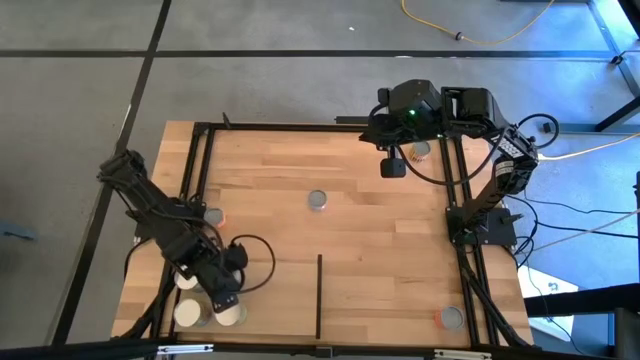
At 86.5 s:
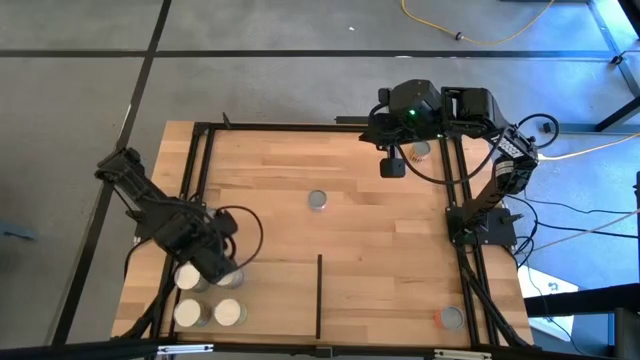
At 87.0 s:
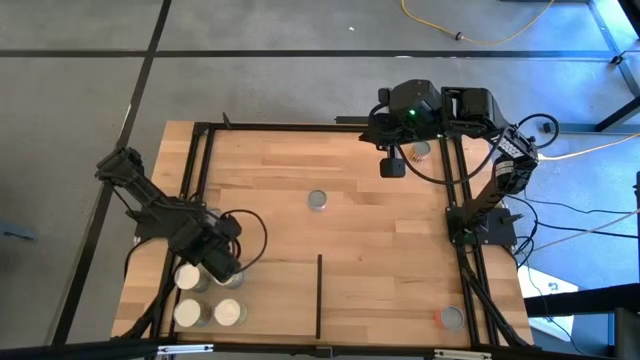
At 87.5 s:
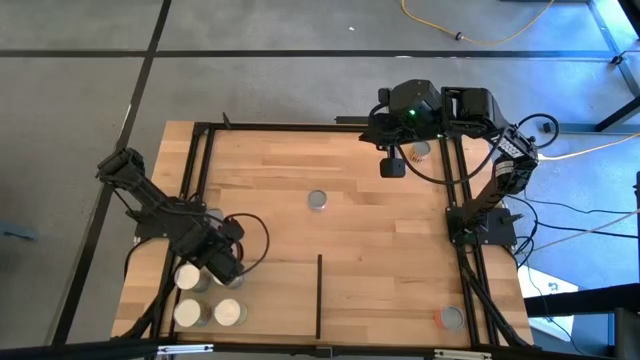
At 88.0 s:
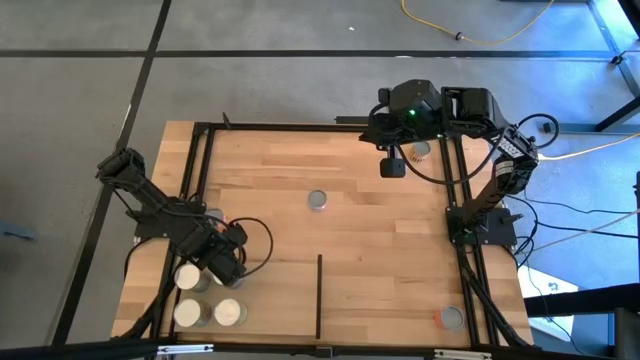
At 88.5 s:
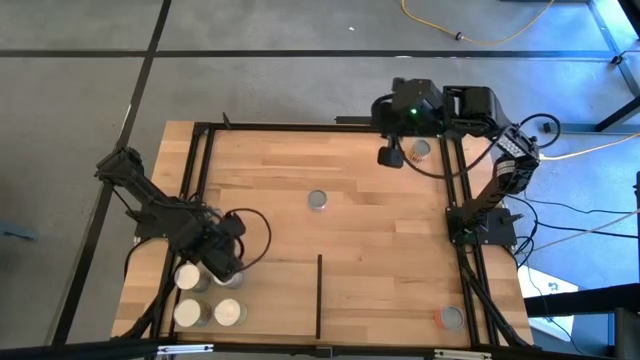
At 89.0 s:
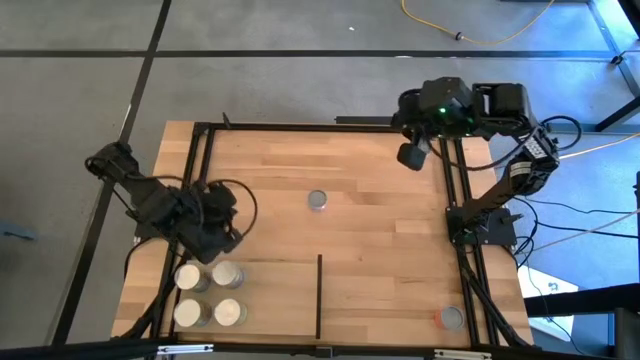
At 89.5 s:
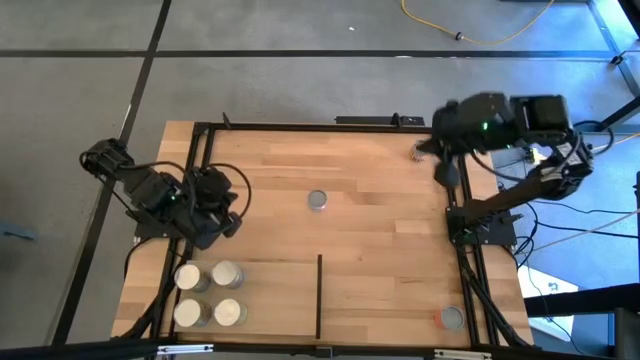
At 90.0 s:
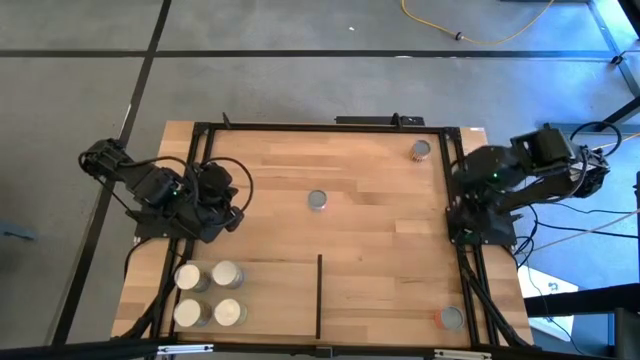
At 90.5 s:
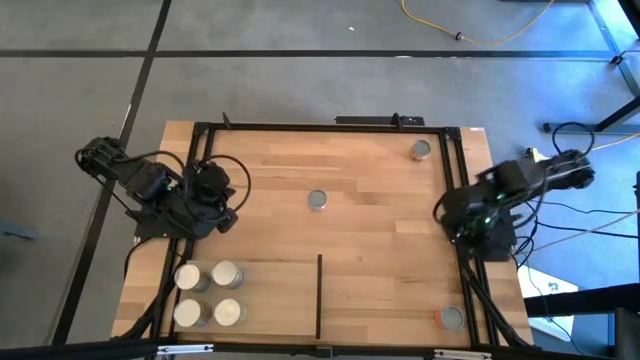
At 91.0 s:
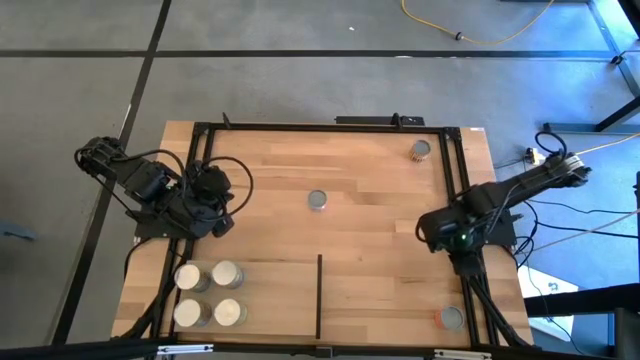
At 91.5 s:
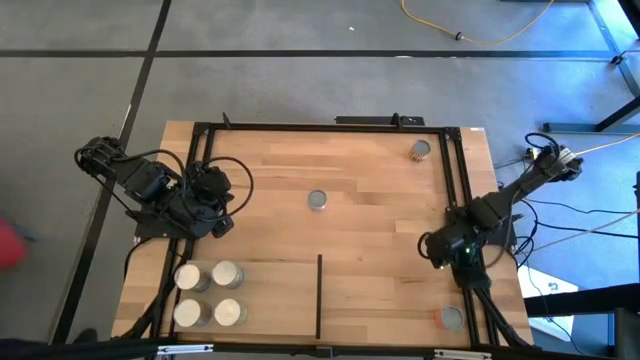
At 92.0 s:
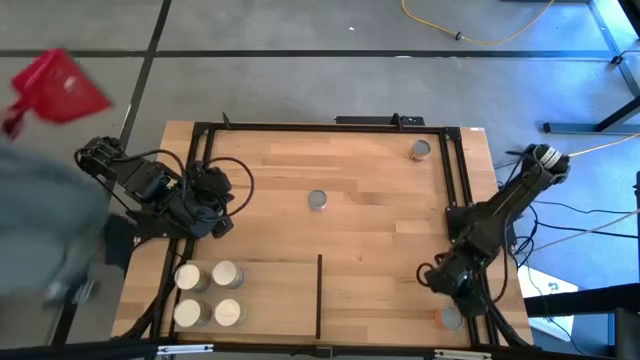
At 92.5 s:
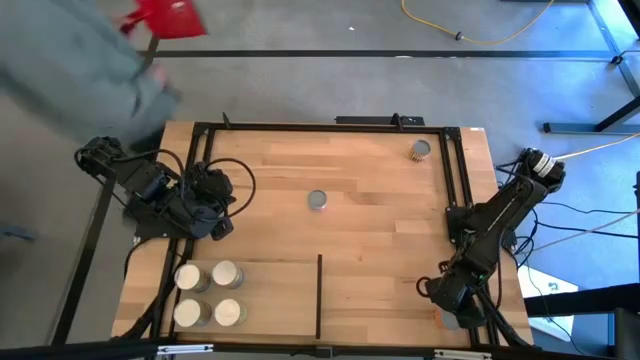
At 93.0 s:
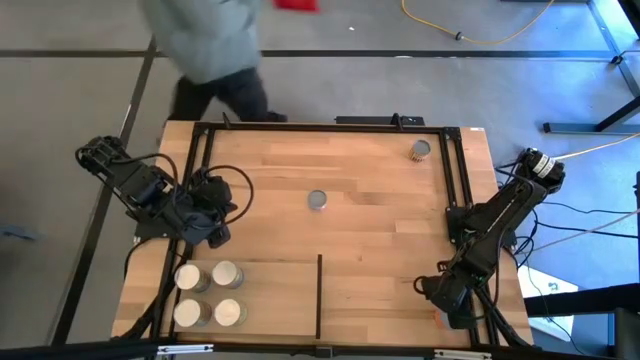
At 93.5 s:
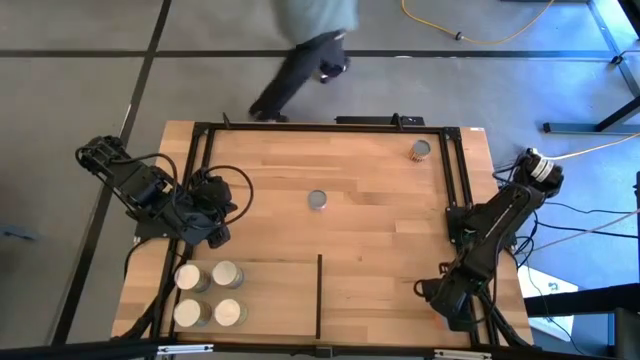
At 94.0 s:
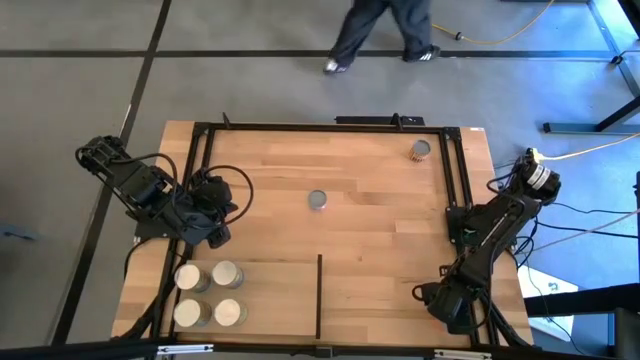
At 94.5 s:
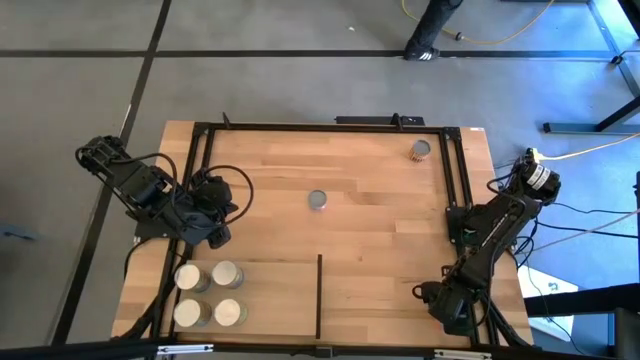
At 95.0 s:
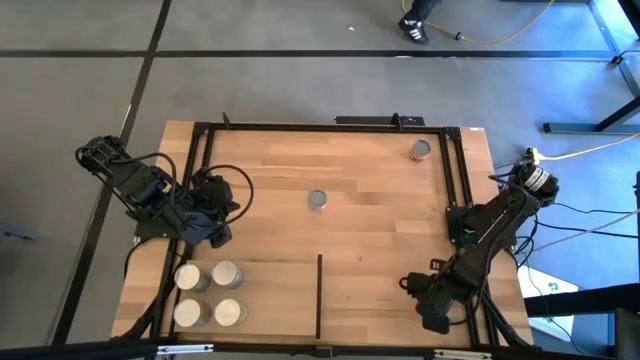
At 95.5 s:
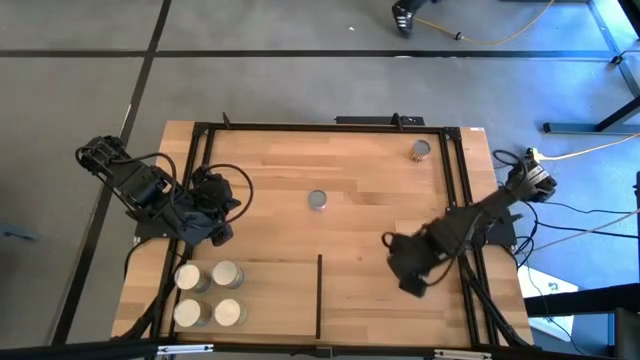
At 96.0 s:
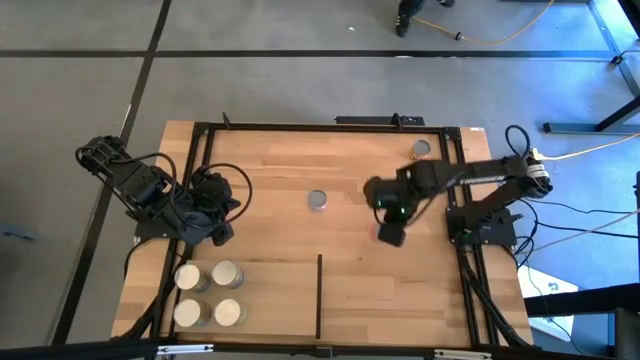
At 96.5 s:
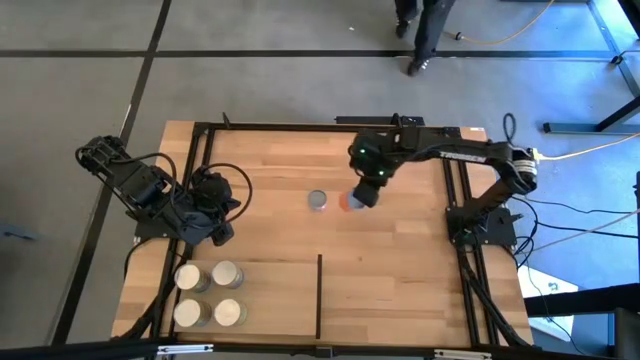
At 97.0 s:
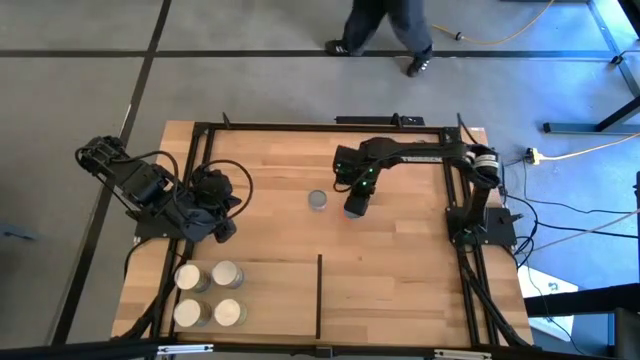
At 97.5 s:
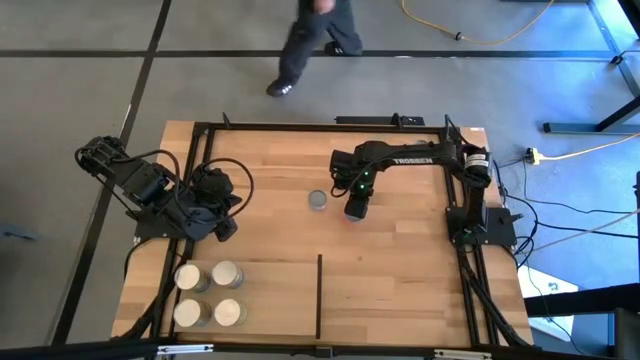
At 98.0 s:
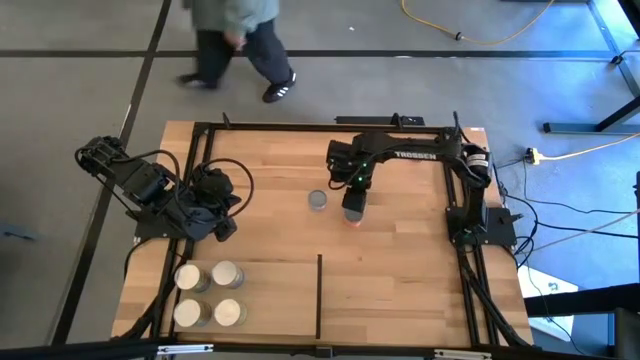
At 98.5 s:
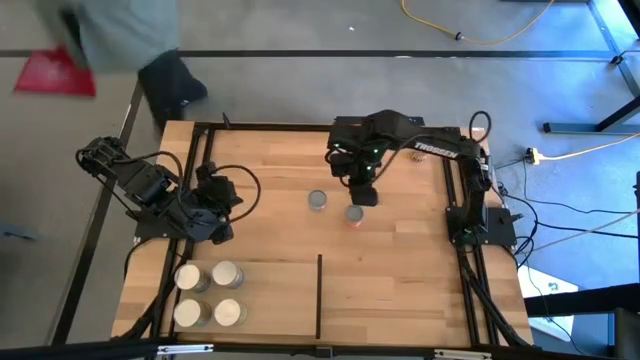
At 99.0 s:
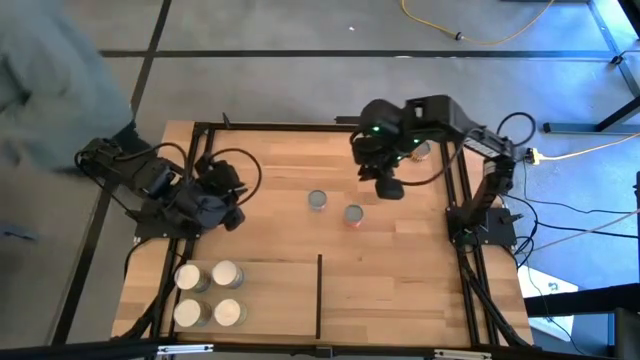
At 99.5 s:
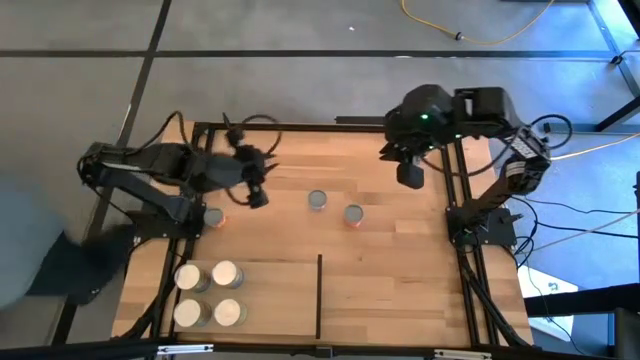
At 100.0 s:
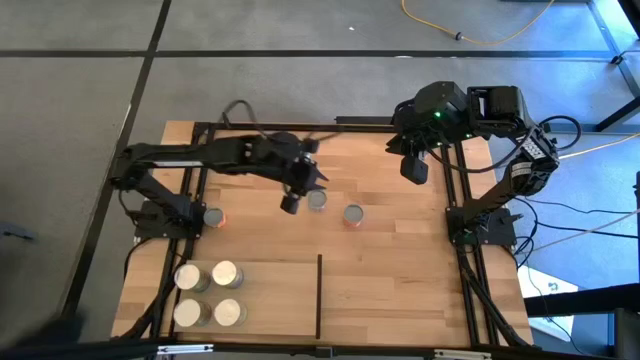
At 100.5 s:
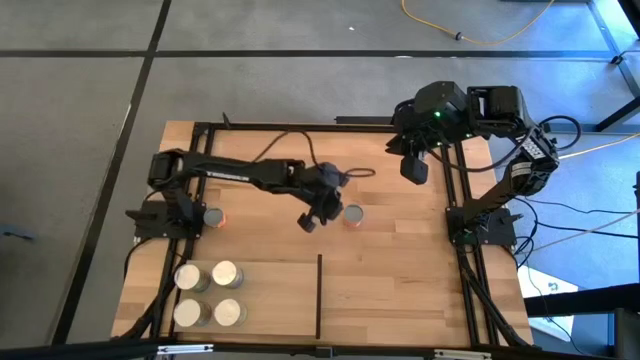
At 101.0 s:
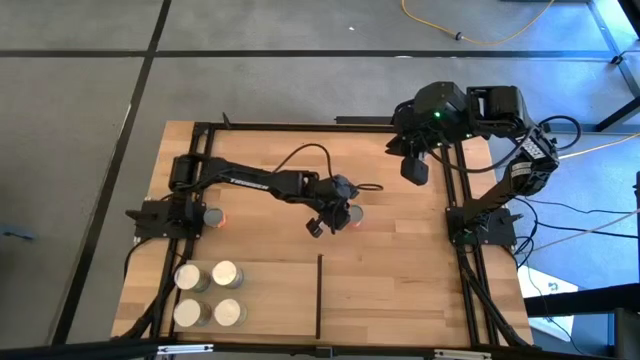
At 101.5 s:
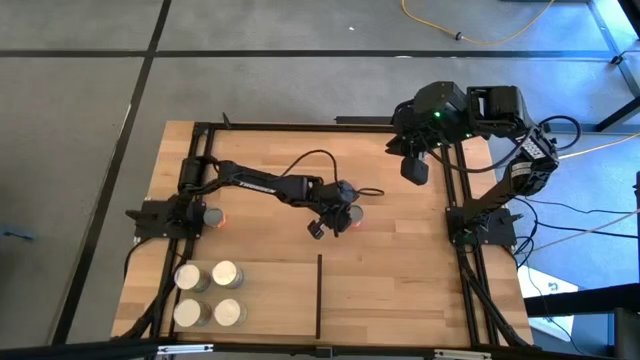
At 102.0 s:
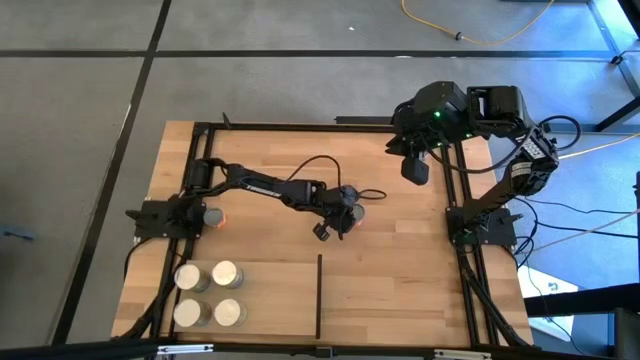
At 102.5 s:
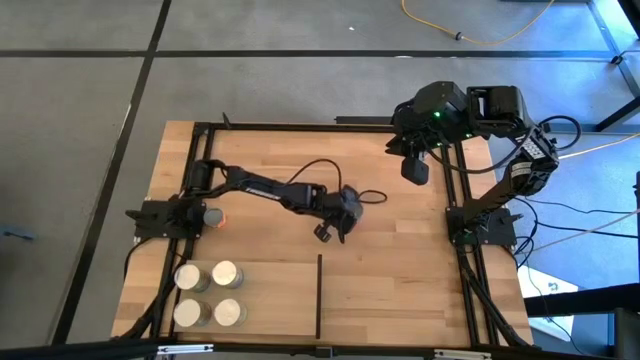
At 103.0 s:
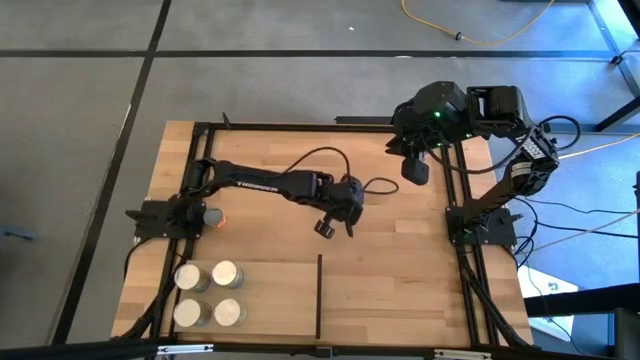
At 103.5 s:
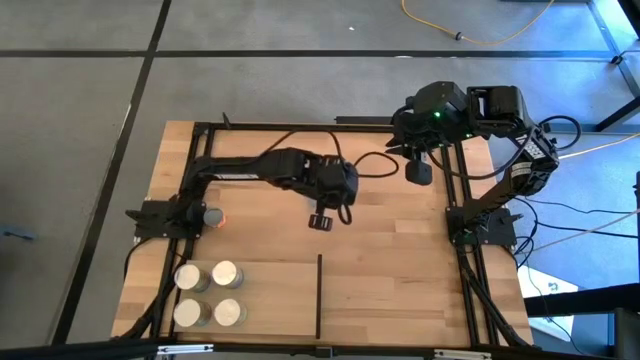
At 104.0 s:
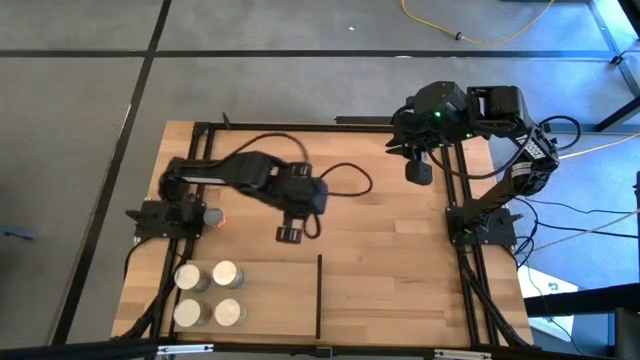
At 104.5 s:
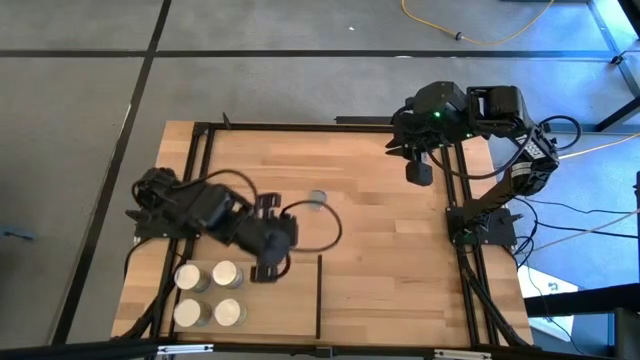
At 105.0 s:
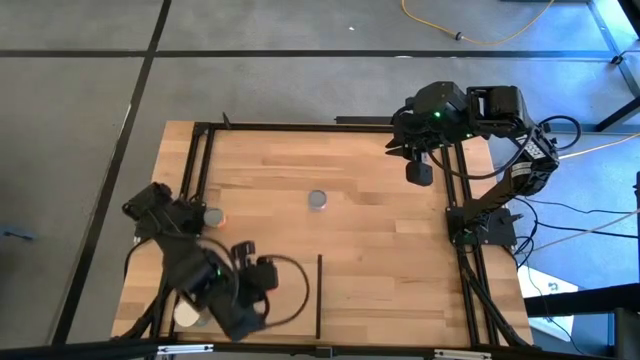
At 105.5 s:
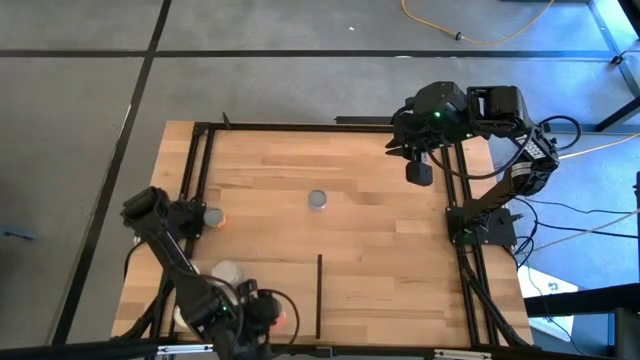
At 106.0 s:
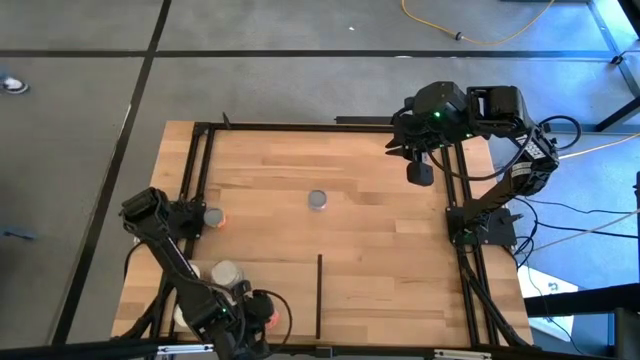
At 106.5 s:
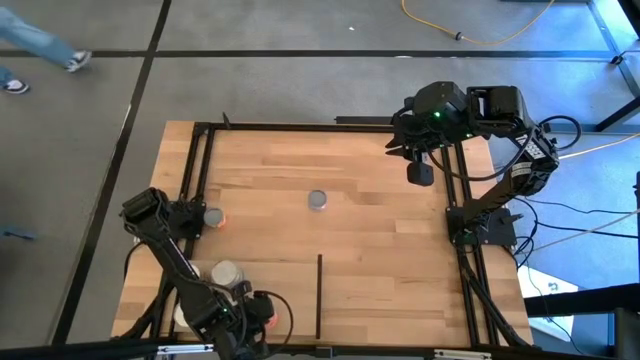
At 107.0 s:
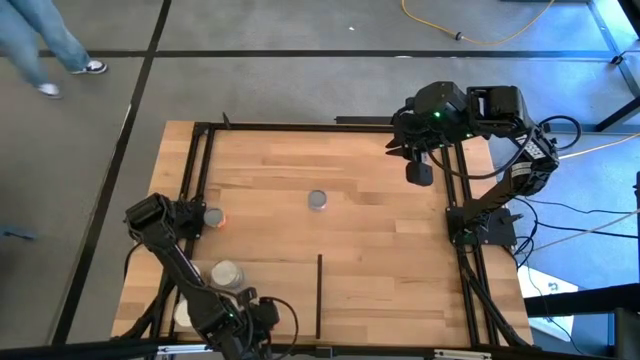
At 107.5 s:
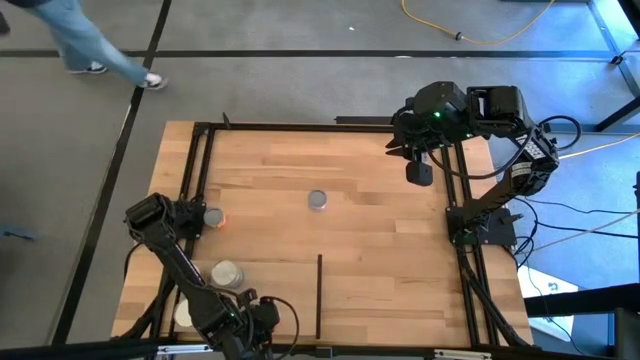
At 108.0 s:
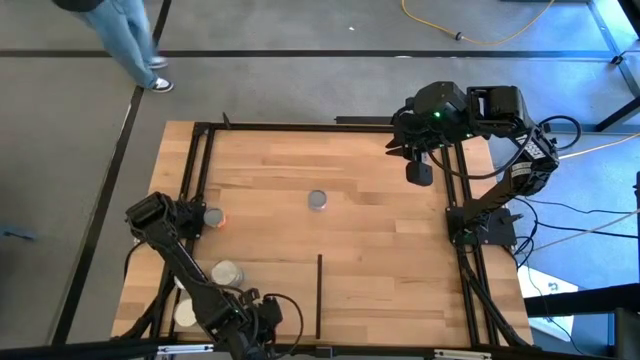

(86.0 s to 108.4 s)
Task: Pick and place cans onto a shelf
Put the canned sauce on the shelf
